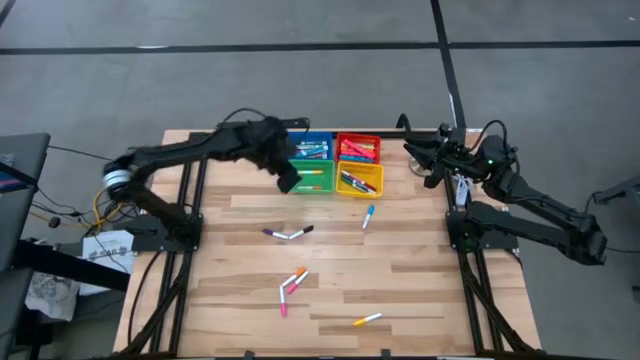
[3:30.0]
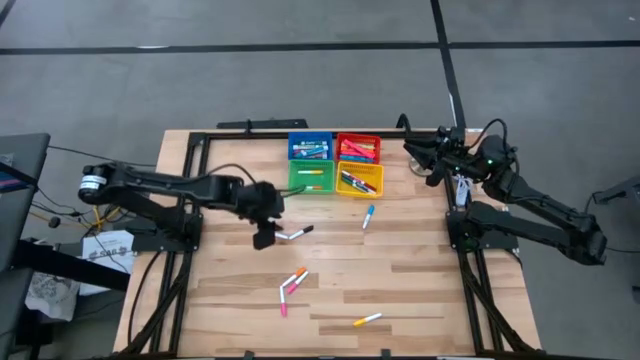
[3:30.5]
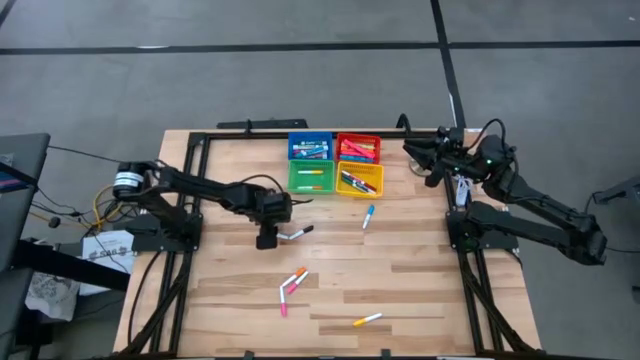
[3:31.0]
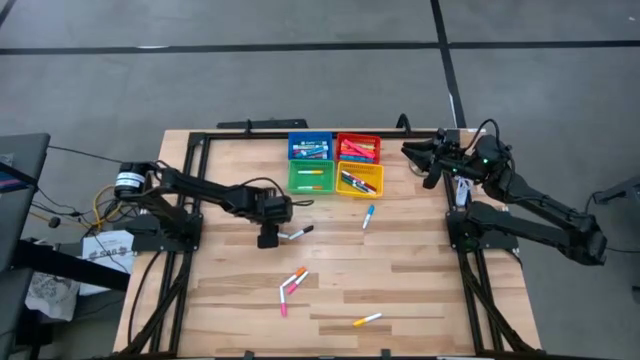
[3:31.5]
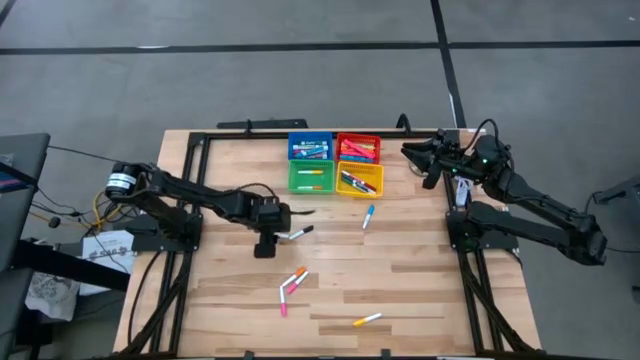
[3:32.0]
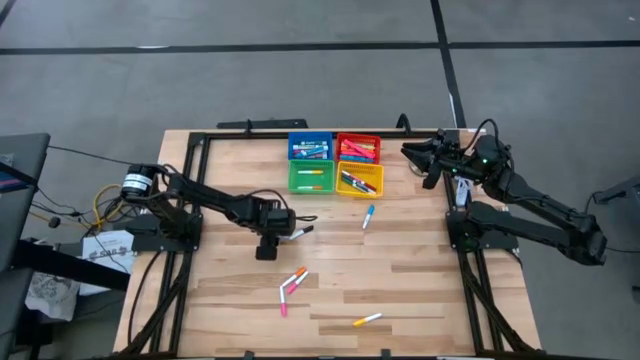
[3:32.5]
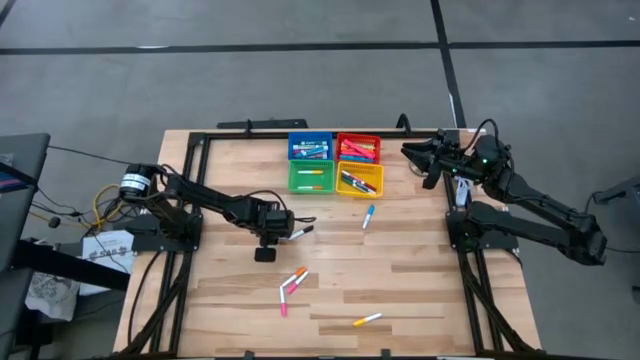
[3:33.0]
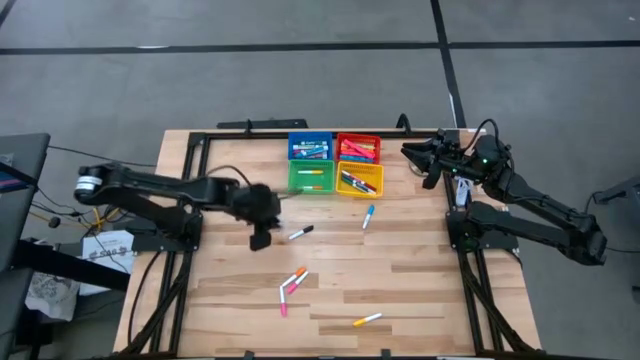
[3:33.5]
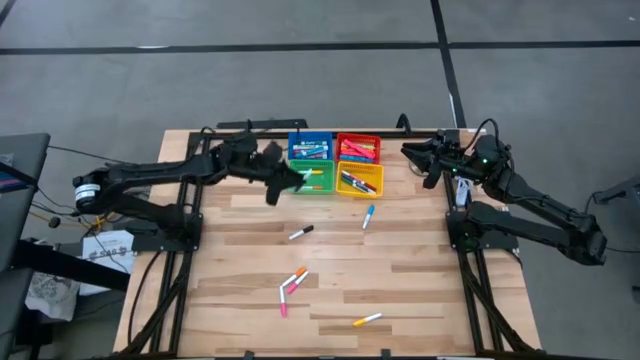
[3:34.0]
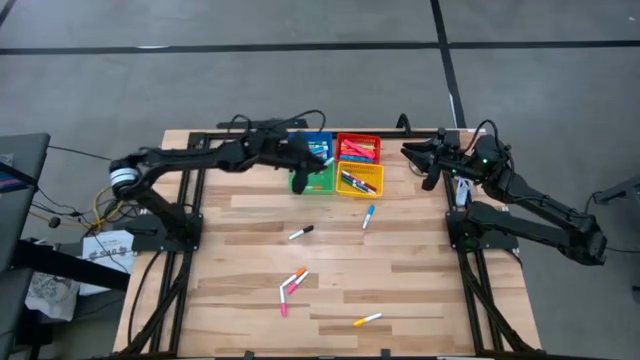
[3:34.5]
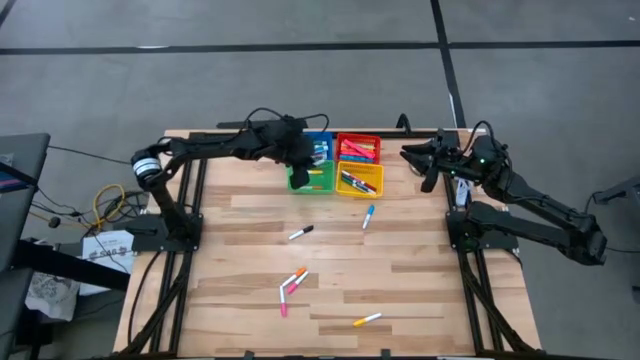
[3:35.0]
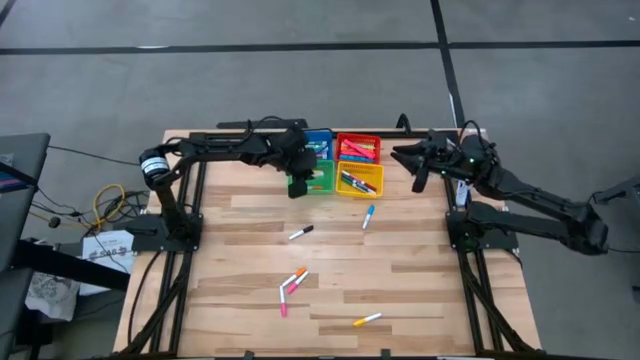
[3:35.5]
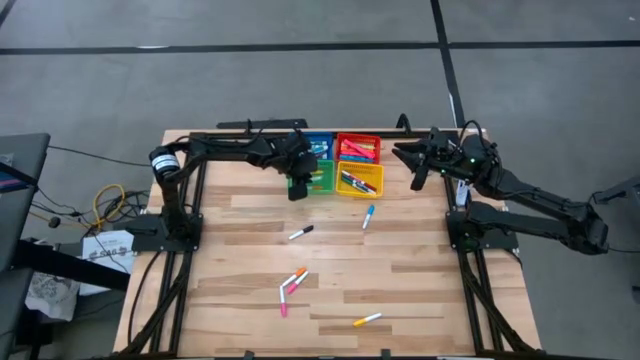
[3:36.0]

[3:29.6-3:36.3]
Task: Pick & Place Markers
Put the purple highlighter in the green bin

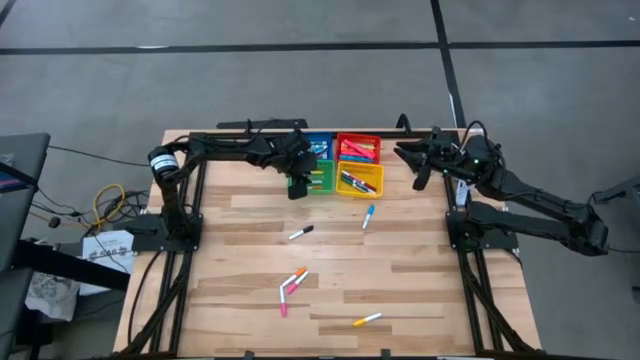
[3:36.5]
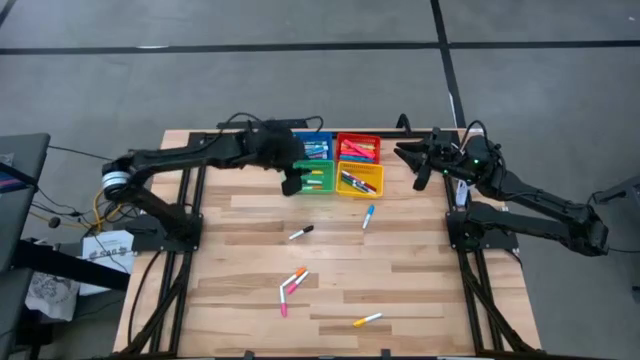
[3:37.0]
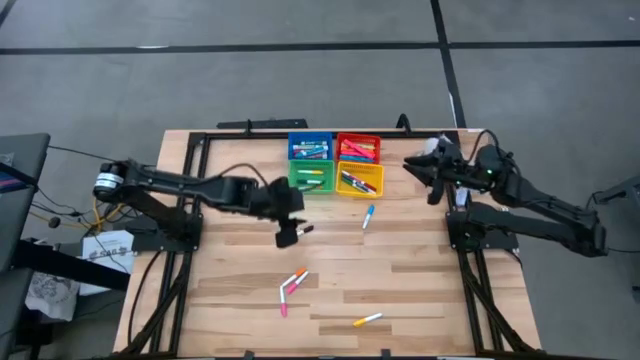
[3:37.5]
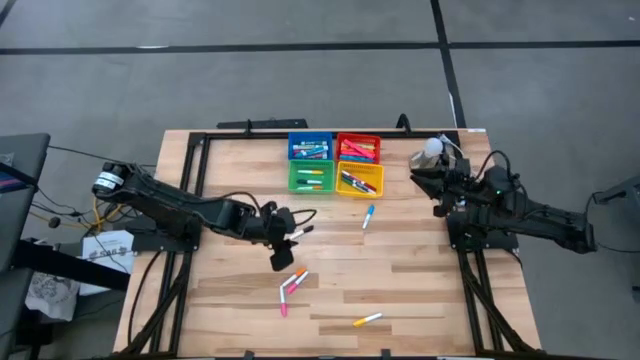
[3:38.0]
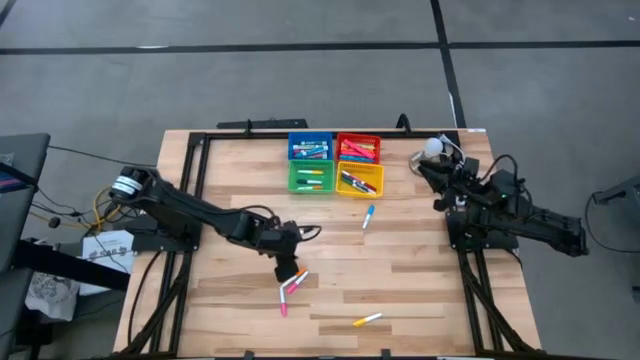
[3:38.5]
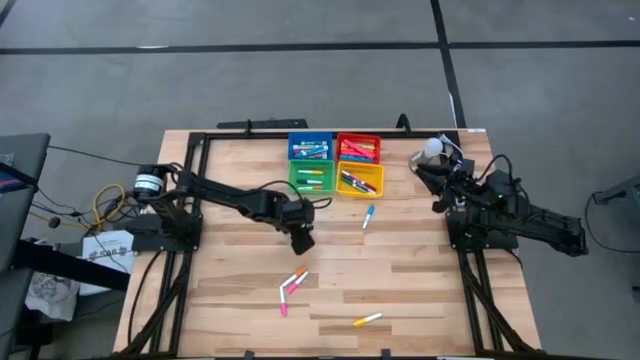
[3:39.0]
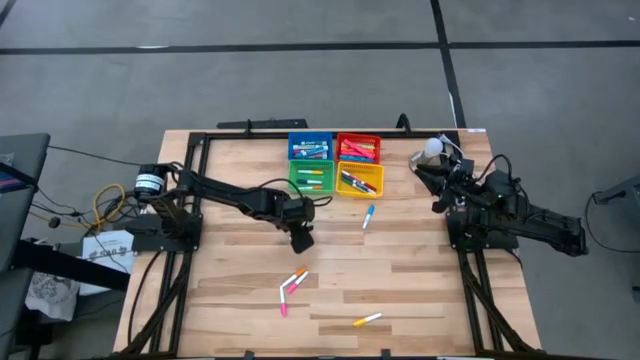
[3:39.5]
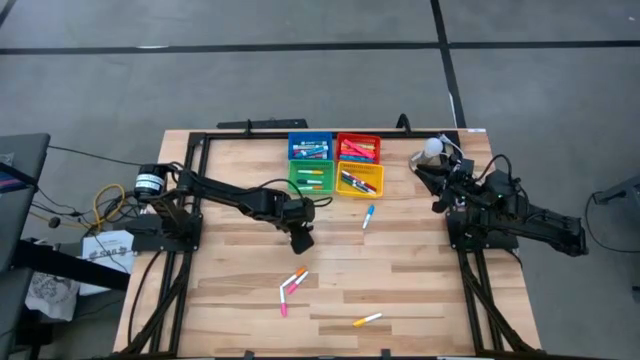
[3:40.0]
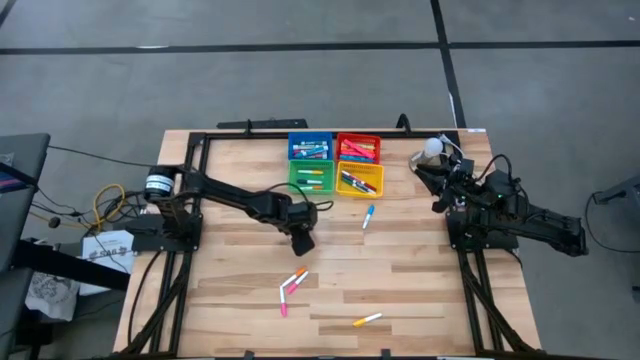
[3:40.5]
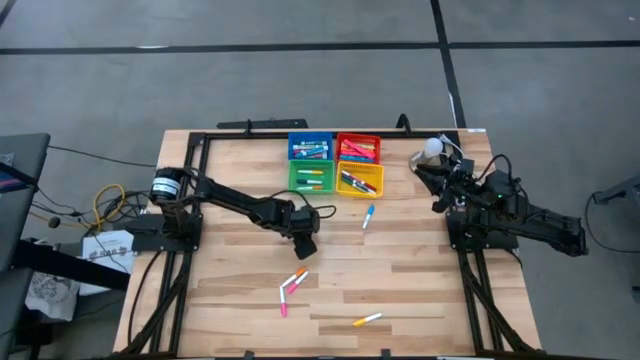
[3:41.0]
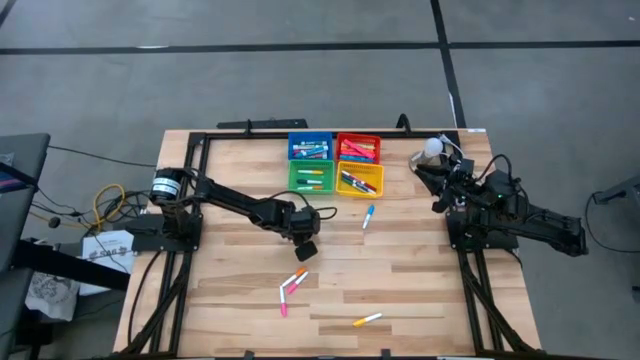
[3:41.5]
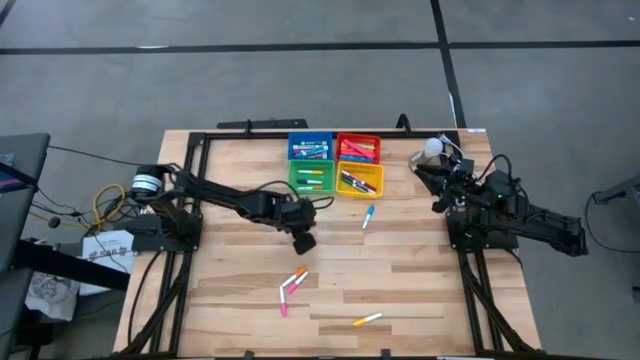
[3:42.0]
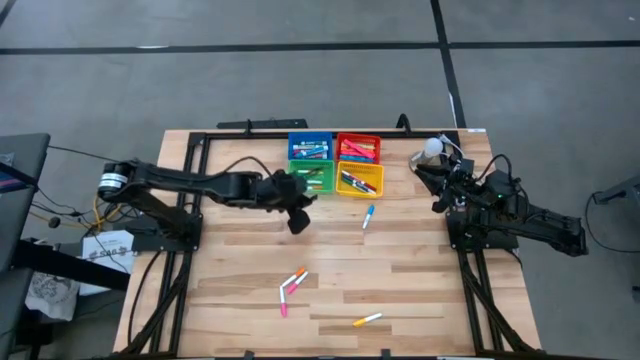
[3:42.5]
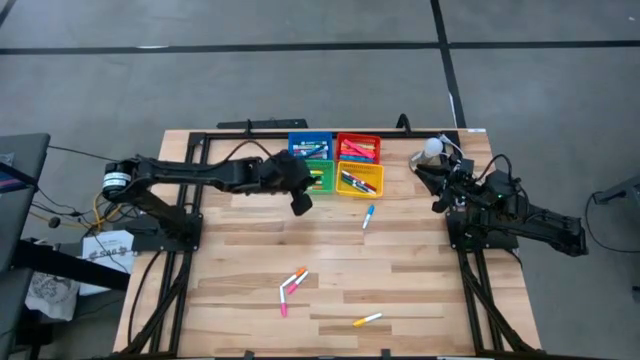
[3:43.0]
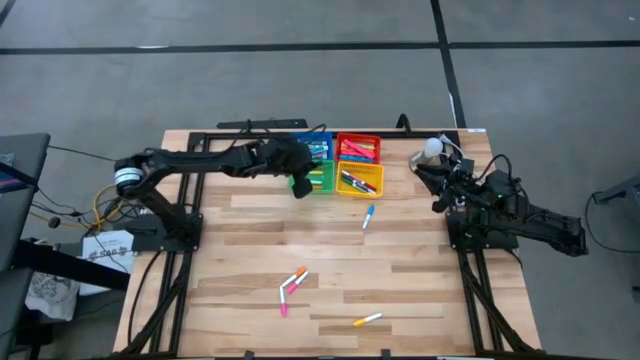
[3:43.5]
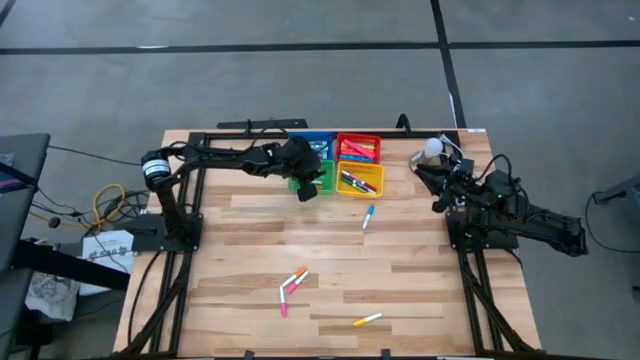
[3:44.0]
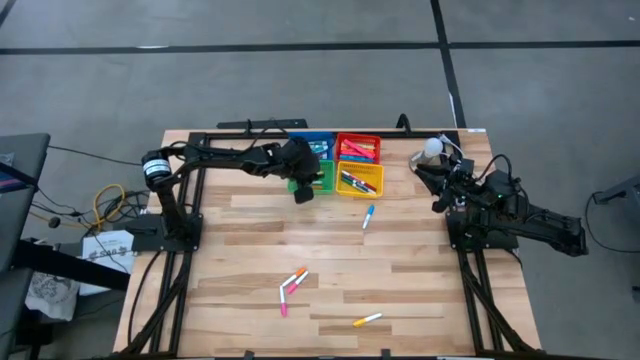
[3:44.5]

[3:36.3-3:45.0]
Put the black highlighter in the green bin
